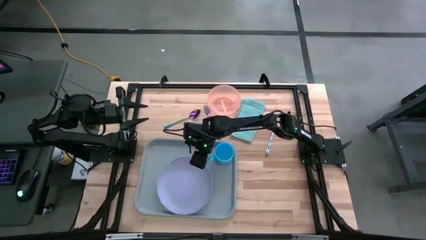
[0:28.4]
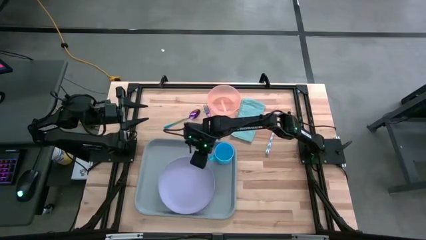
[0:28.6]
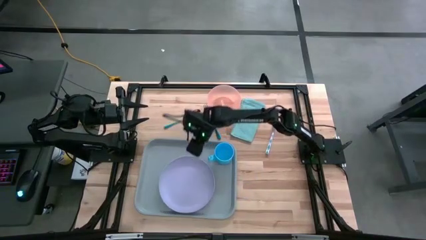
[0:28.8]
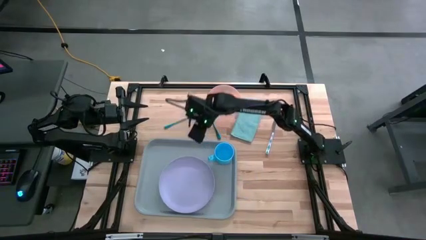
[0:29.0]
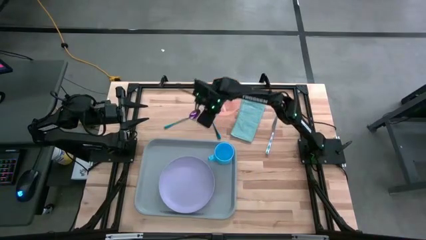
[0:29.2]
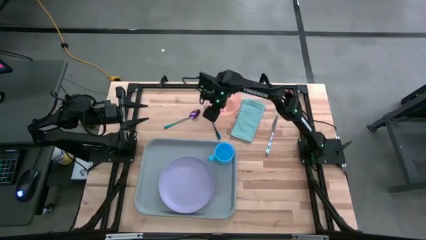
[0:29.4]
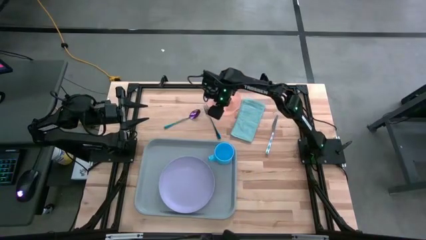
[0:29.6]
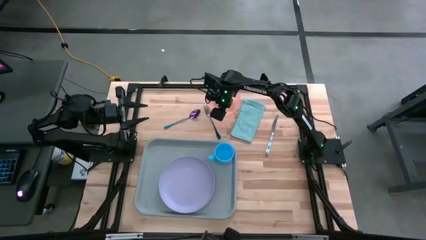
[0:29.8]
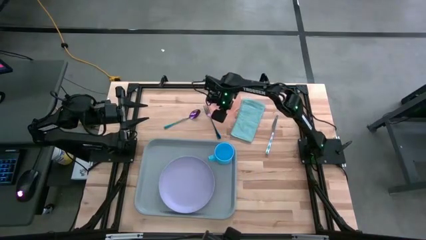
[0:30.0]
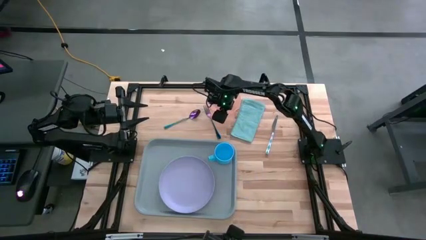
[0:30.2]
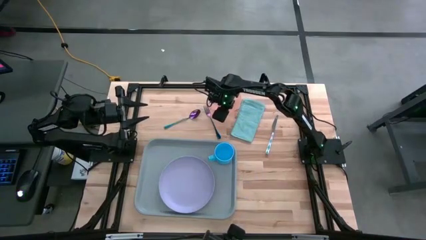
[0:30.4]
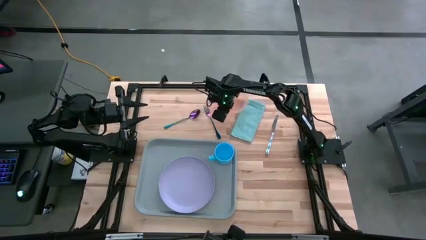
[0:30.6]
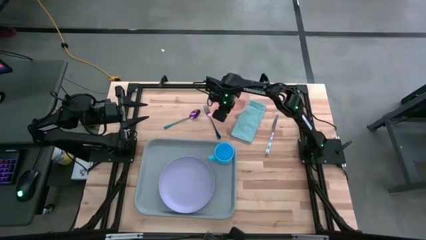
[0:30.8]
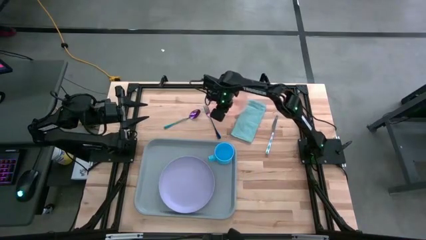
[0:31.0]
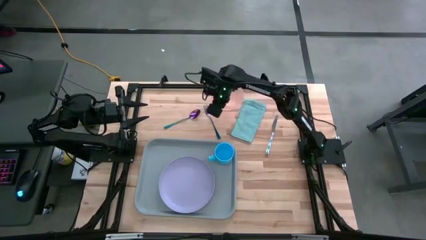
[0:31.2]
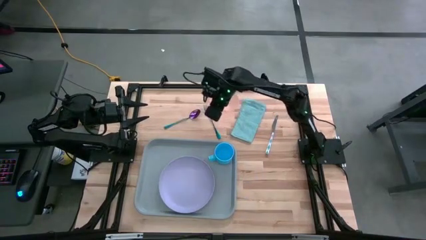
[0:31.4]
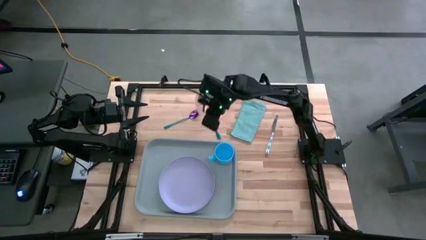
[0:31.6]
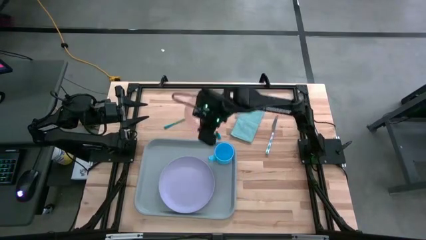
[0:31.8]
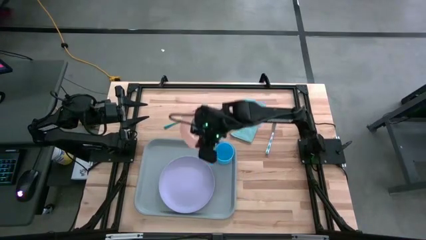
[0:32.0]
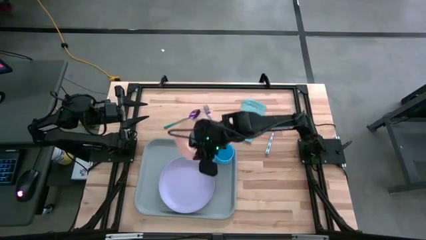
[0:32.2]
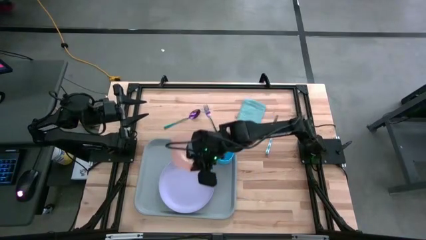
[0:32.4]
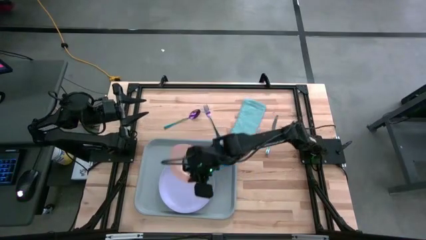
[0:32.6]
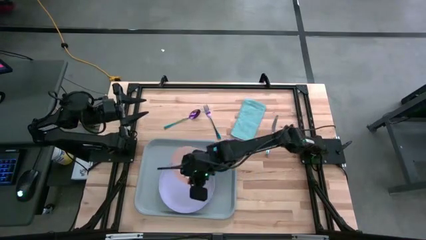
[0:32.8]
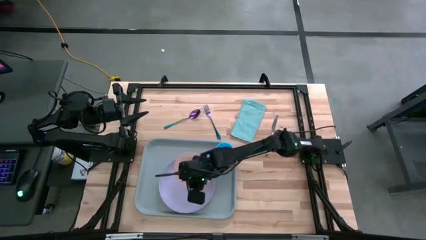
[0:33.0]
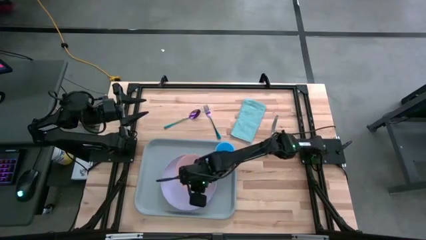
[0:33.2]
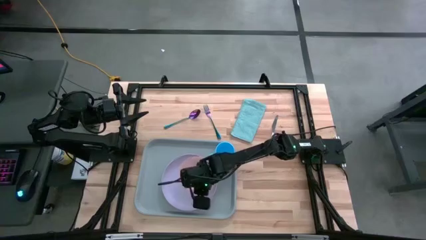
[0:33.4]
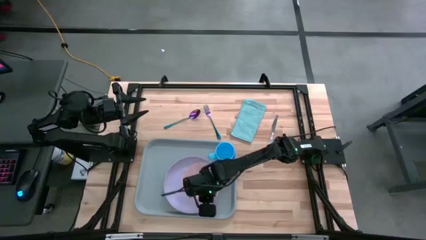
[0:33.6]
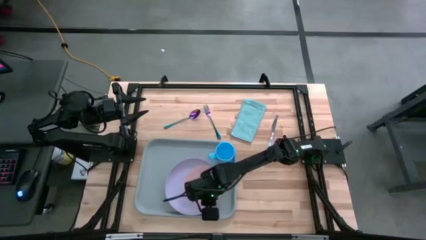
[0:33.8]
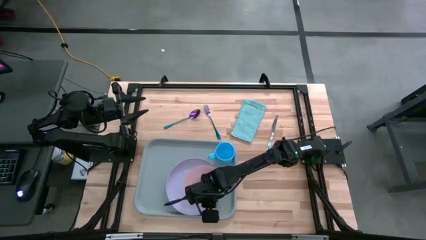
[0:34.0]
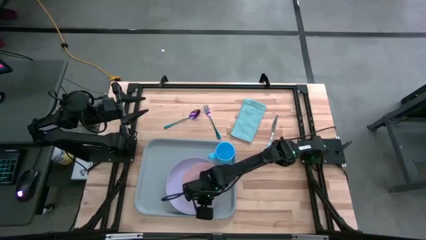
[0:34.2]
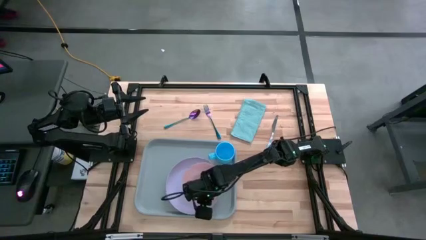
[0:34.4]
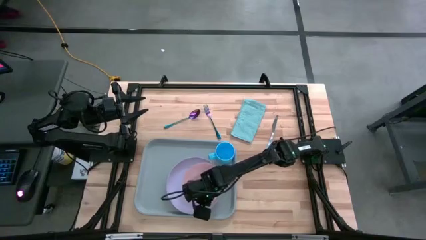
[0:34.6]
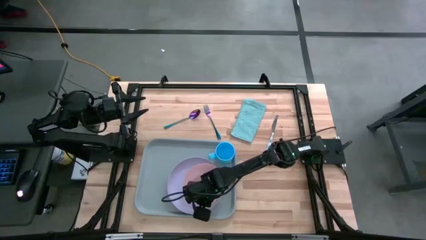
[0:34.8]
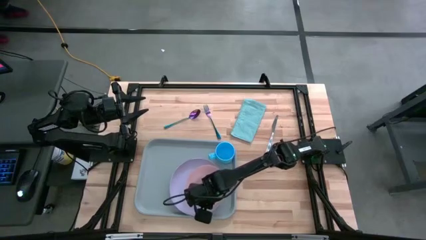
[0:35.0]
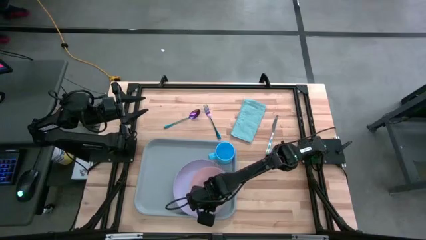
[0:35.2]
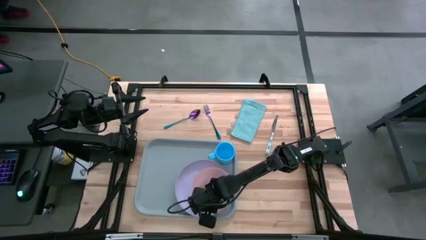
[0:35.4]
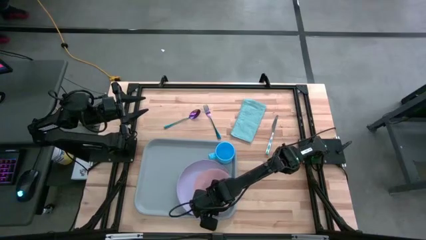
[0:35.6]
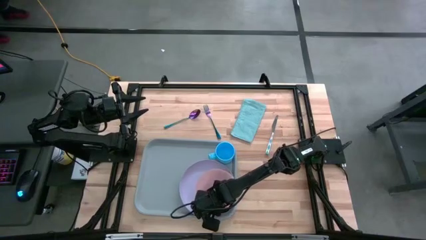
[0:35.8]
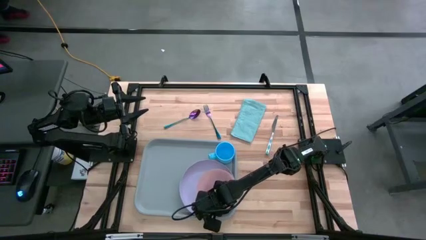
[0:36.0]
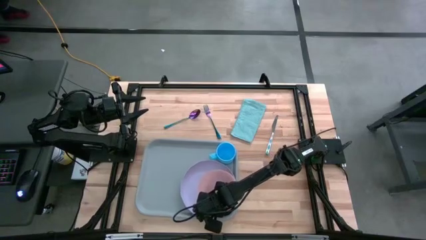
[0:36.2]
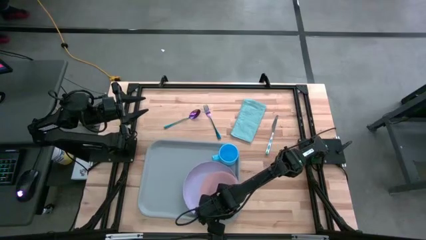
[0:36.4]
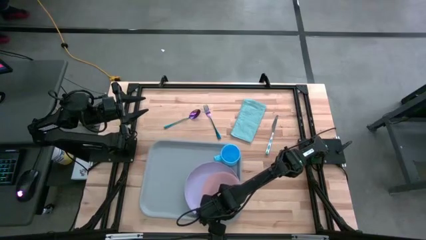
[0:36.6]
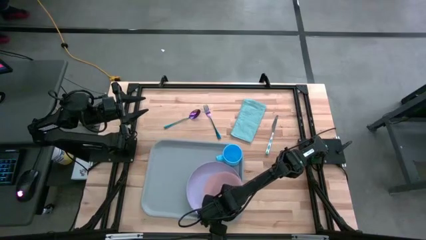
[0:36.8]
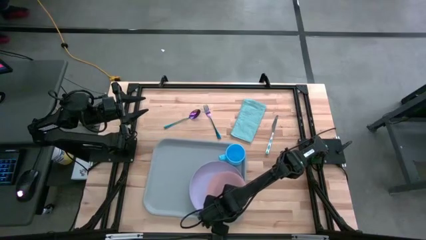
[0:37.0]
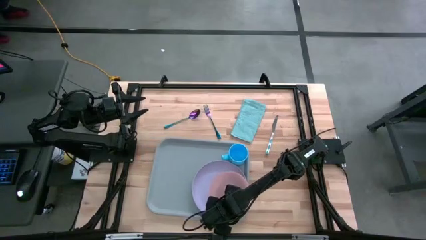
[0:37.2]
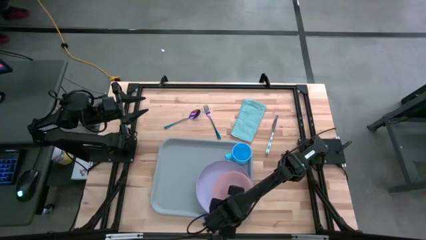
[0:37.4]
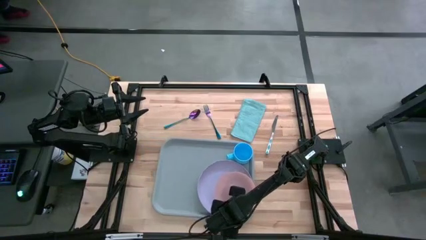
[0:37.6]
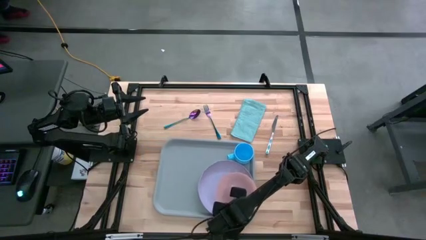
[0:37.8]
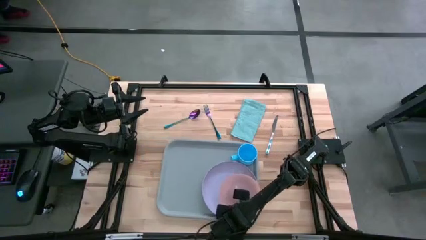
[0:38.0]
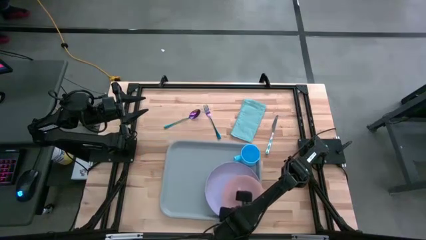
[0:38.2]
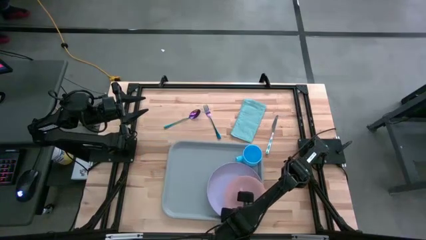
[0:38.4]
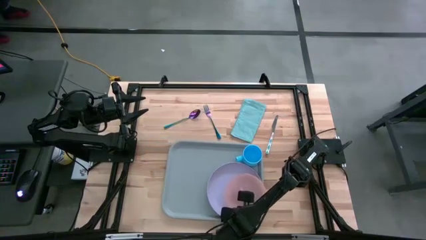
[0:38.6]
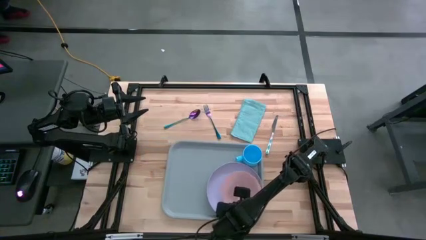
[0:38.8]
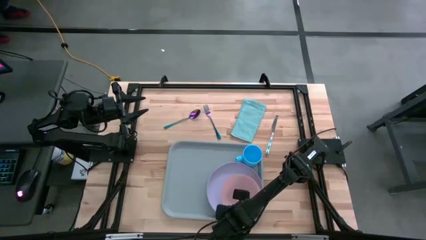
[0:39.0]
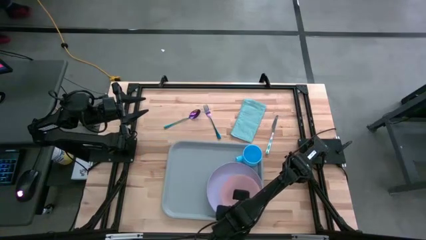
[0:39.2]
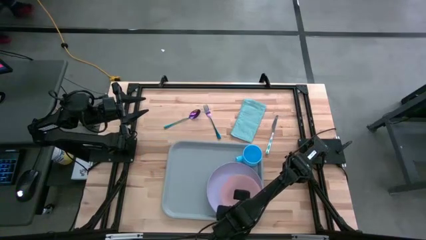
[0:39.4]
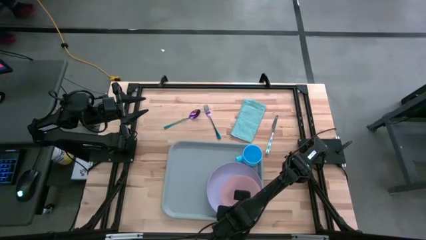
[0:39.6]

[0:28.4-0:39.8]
Task: Set up tray
Put the light orange bowl on top of the purple plate on the serving tray
